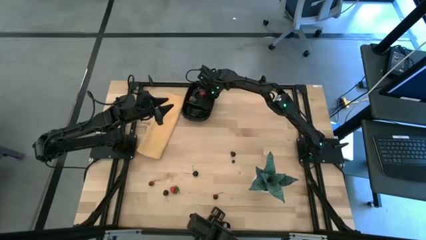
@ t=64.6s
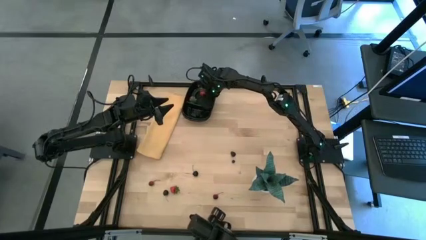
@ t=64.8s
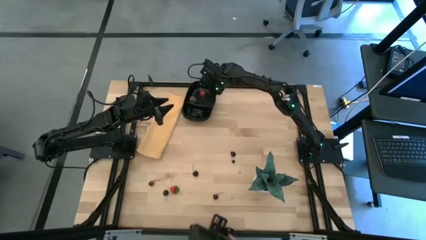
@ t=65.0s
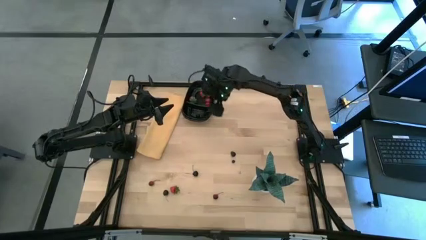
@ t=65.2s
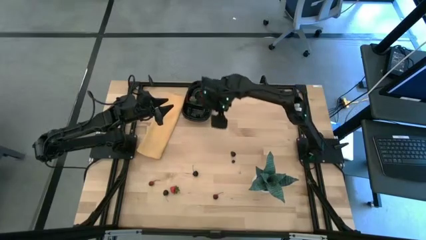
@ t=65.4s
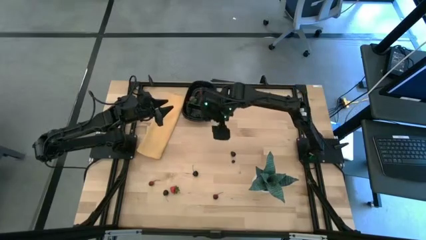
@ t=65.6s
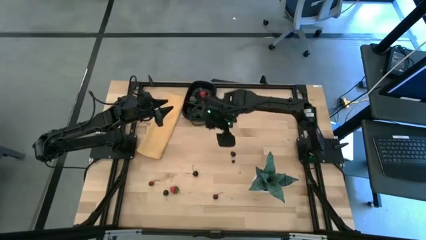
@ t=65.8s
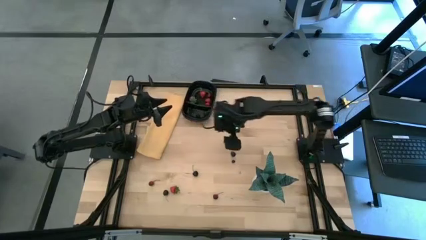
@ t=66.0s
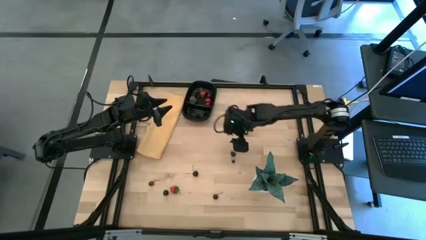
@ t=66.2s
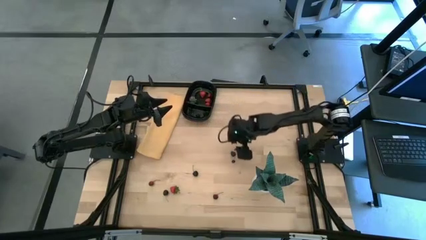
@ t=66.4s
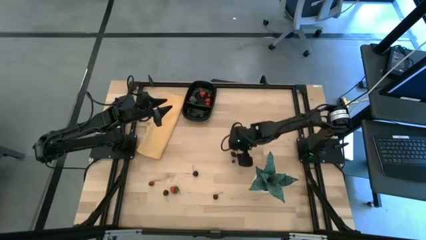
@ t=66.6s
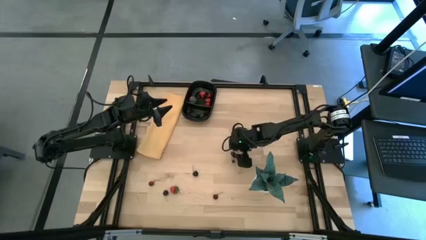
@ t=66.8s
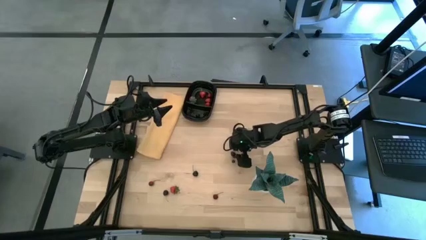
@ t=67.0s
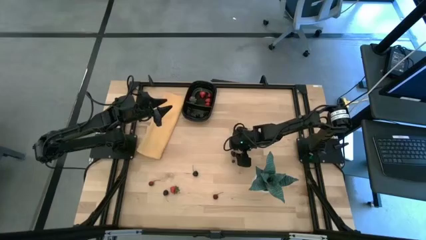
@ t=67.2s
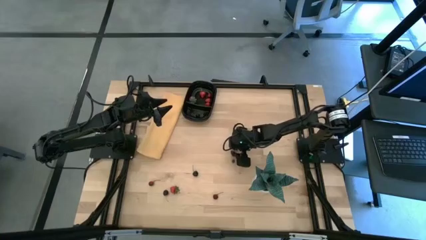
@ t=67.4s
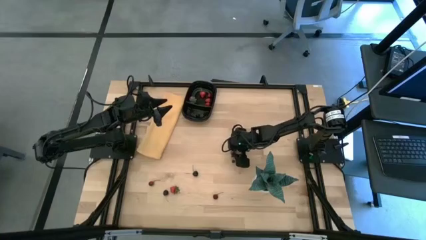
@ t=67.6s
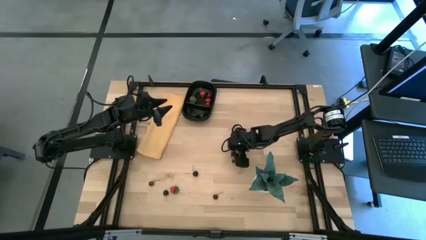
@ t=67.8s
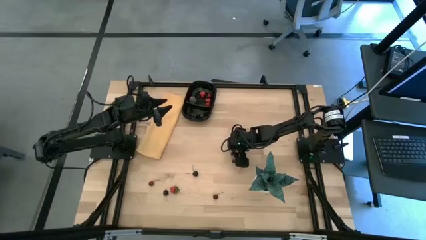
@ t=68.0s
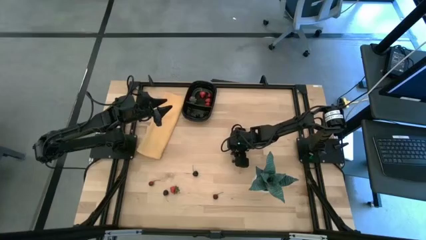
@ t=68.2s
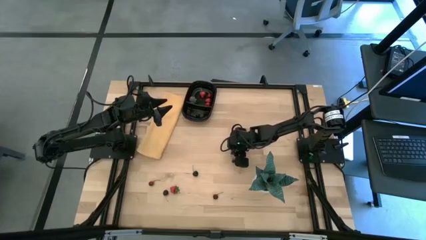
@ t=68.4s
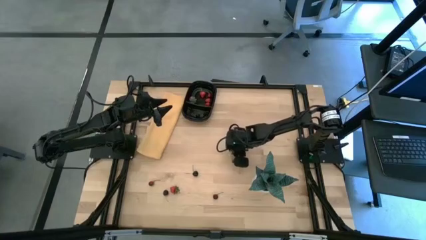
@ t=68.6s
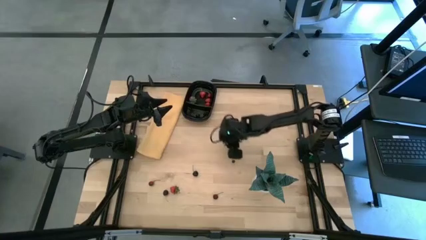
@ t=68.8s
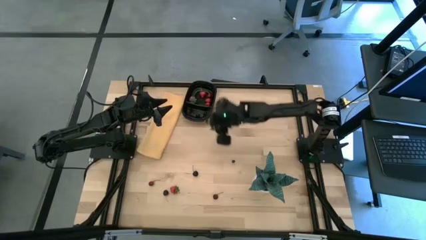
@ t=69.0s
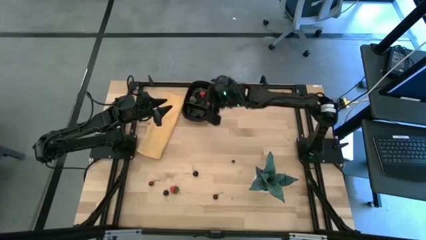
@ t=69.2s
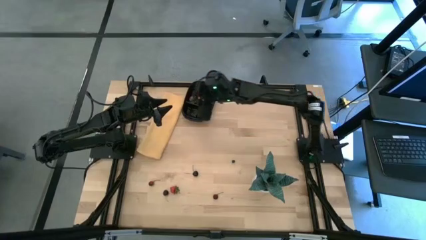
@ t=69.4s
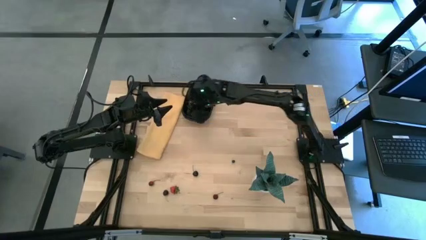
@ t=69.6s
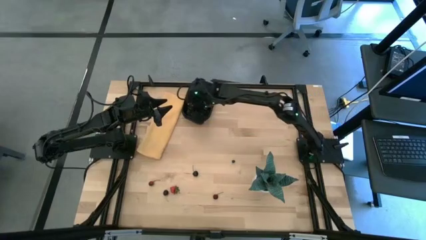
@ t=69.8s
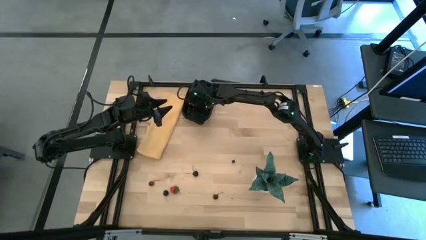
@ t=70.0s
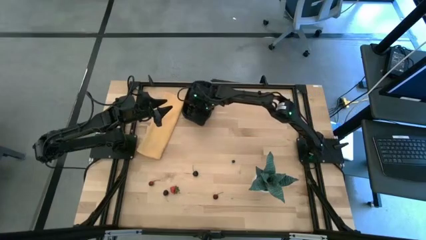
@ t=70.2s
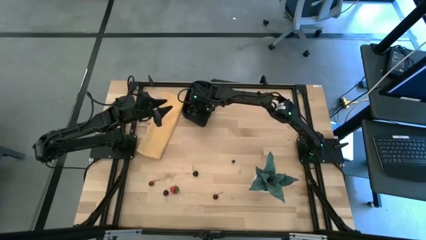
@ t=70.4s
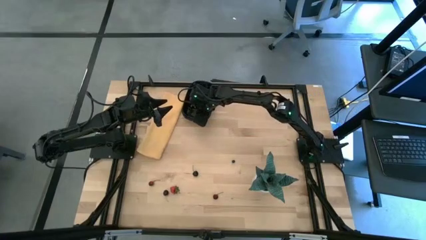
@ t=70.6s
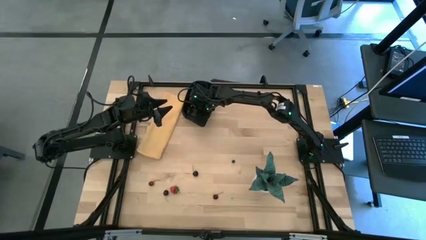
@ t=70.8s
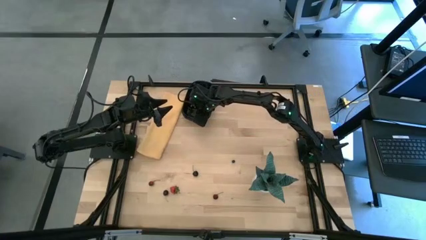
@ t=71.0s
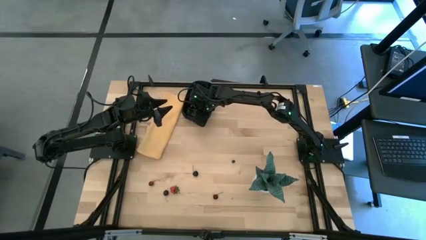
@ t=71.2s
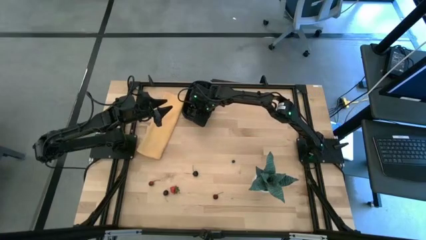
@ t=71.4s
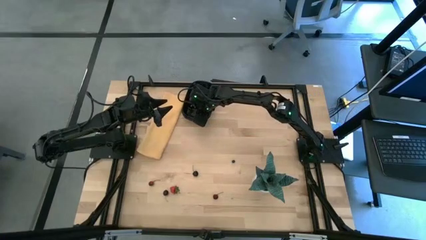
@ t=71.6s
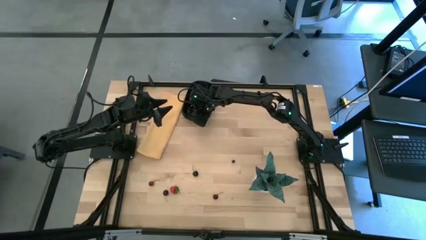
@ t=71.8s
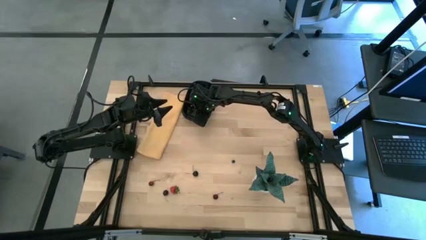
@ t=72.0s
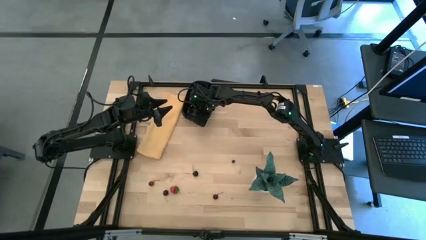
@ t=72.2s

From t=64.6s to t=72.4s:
Task: Pick and placing Produce into tupperware
Put the blackberry into the black bin

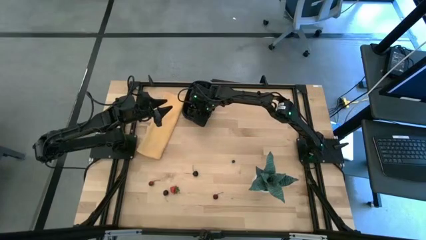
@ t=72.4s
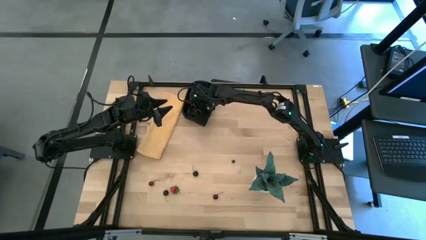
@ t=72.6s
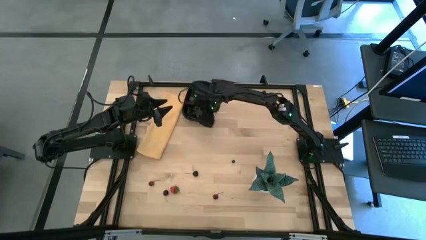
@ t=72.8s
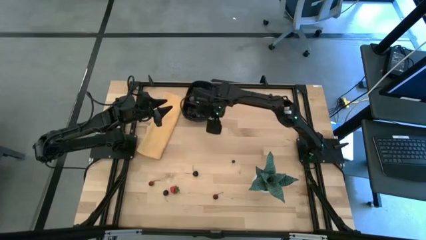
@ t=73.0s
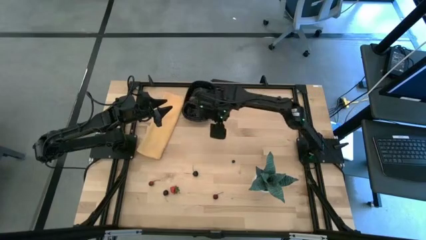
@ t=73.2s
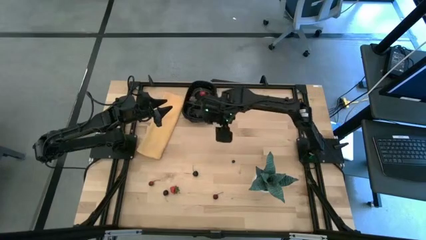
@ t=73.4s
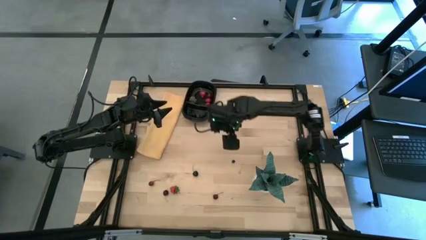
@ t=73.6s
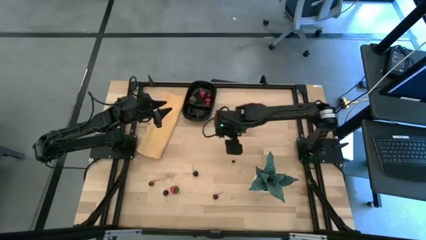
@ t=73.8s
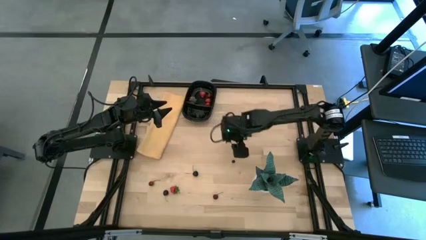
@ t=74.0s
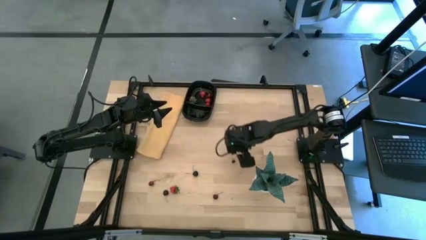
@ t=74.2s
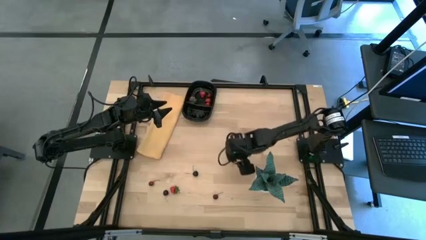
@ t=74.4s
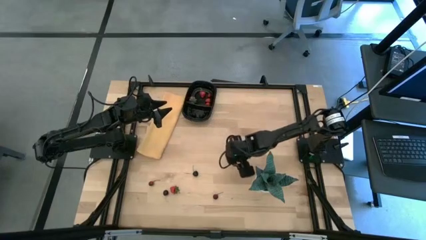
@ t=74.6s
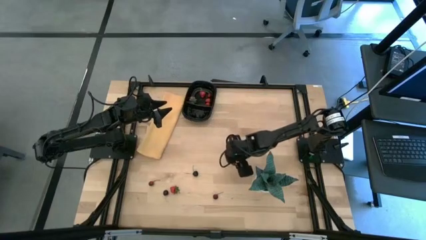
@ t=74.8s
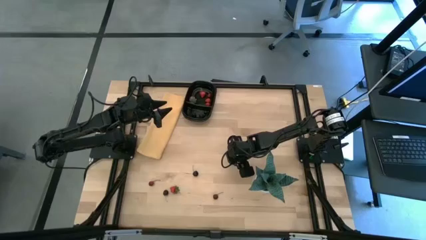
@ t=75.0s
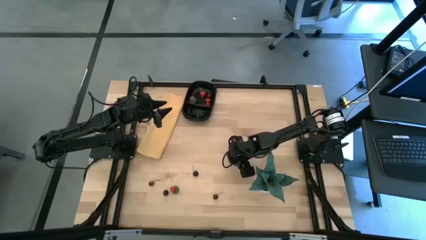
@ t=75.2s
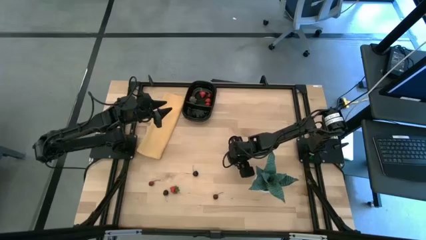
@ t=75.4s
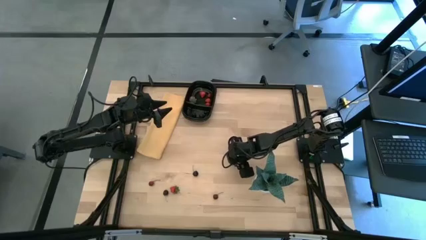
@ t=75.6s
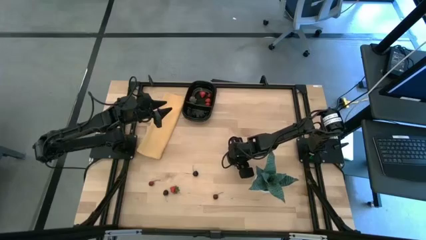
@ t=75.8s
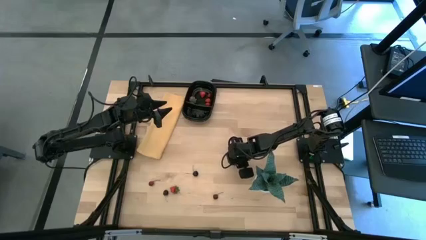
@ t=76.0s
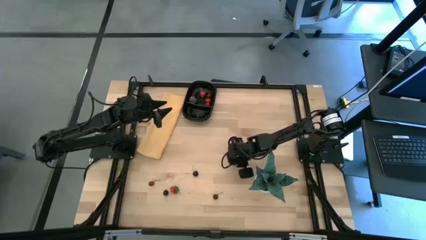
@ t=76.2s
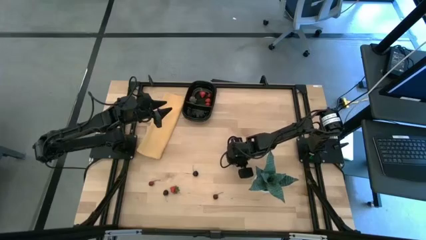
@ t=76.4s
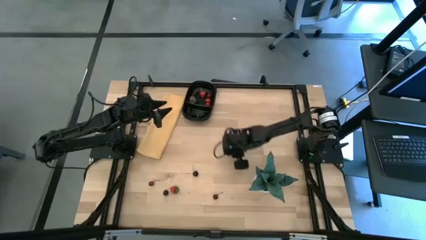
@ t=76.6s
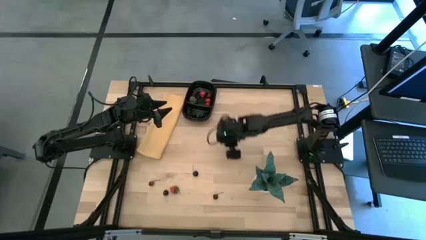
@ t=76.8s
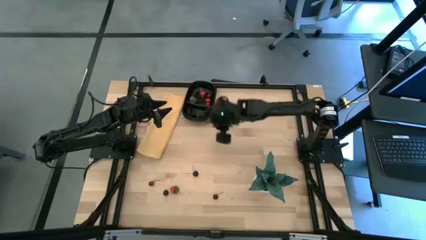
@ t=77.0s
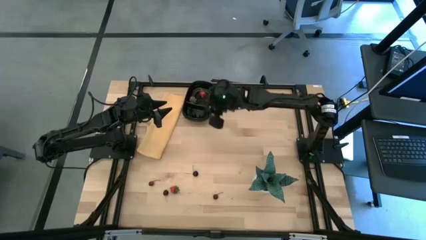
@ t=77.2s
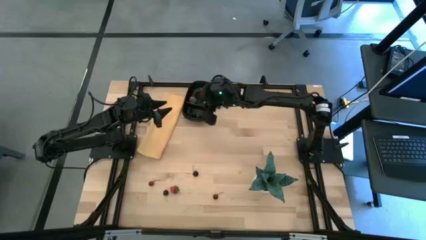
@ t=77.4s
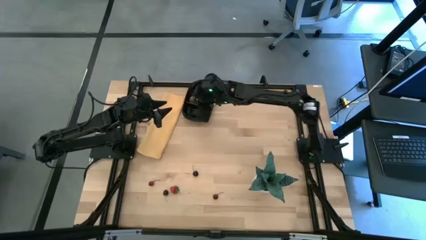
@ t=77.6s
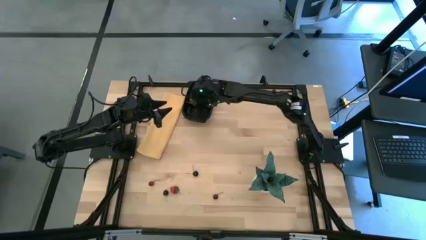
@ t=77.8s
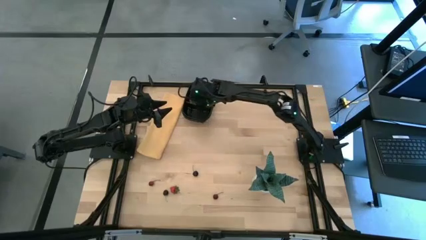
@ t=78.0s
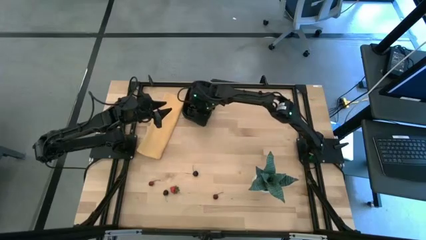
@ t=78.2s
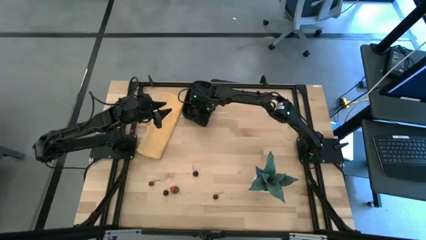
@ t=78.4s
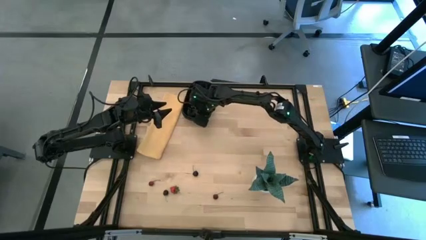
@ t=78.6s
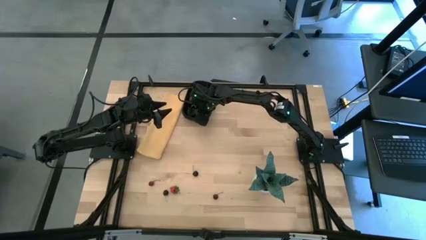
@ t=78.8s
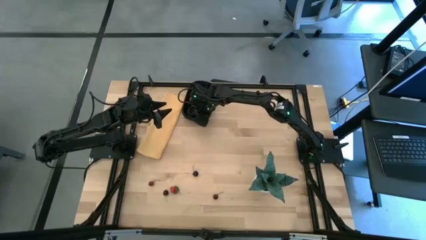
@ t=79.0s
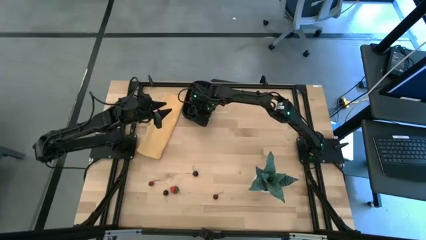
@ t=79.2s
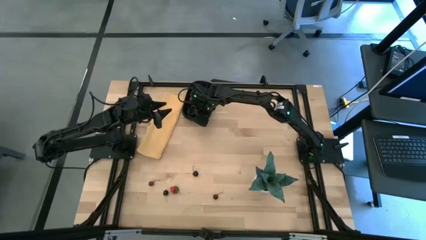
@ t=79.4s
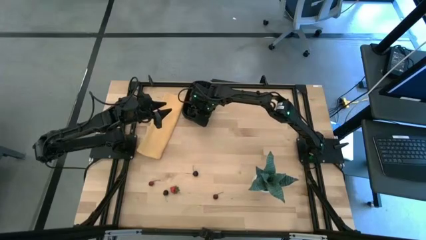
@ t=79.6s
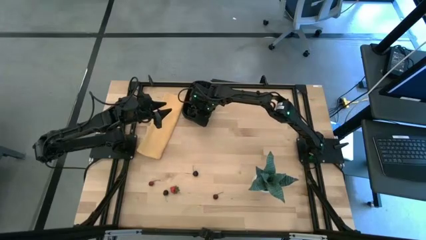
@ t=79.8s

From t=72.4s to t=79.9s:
Put the blueberry into the black bin
